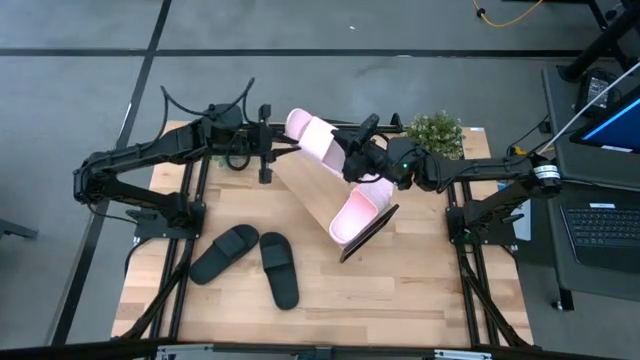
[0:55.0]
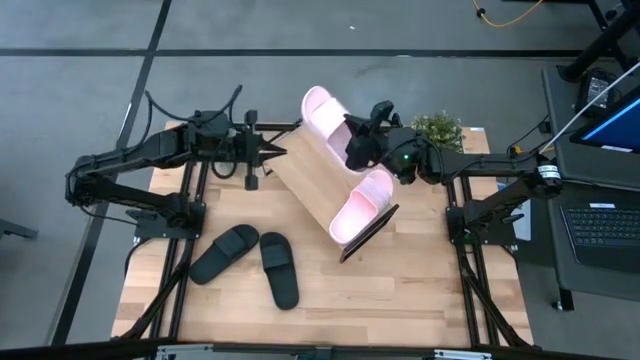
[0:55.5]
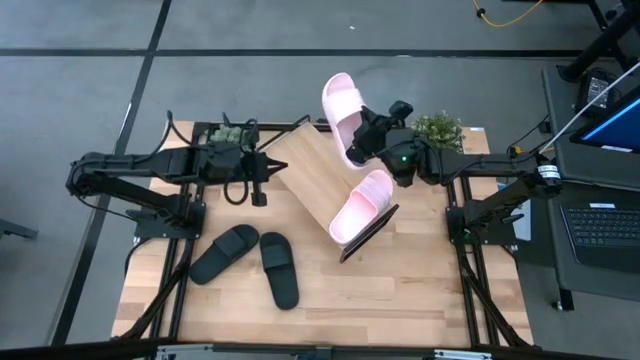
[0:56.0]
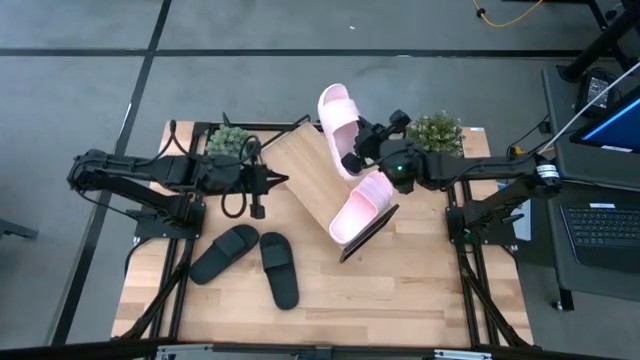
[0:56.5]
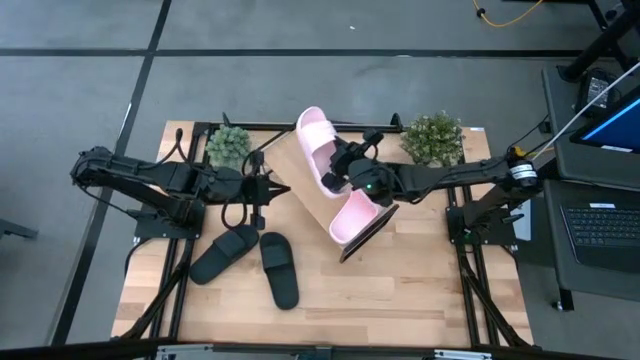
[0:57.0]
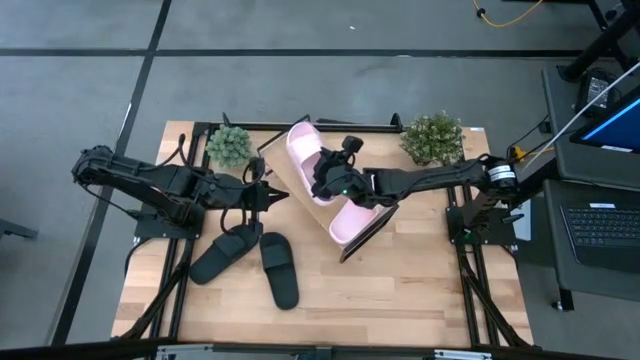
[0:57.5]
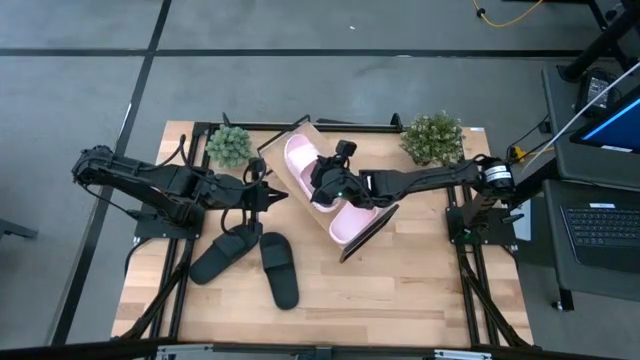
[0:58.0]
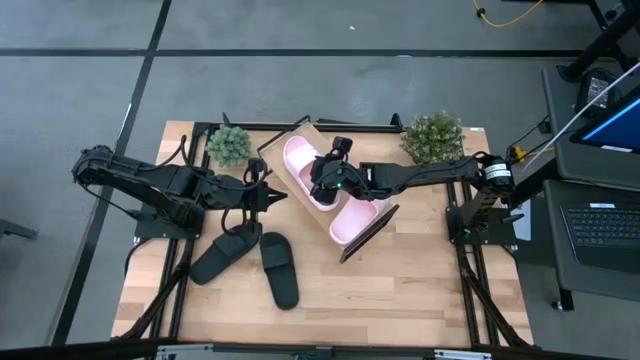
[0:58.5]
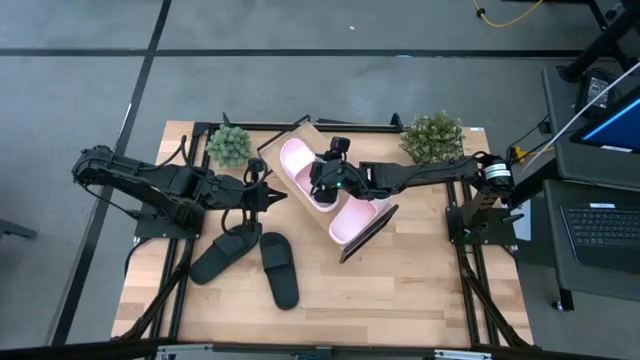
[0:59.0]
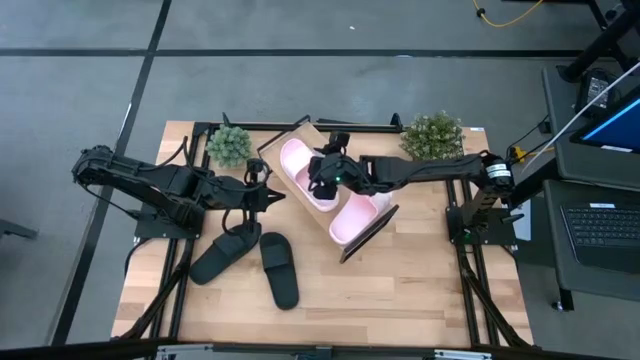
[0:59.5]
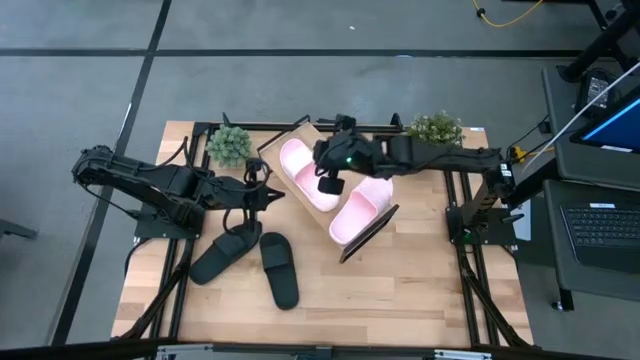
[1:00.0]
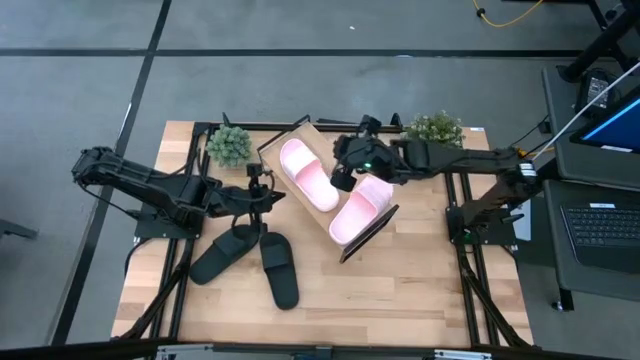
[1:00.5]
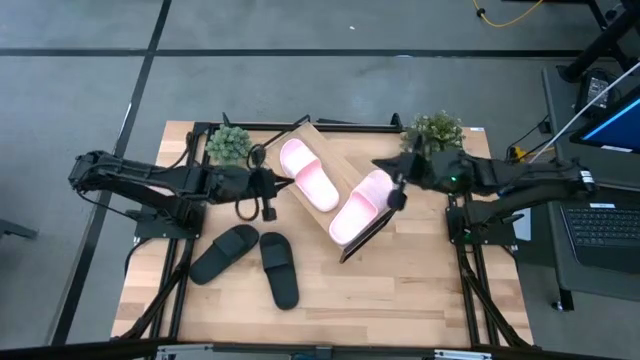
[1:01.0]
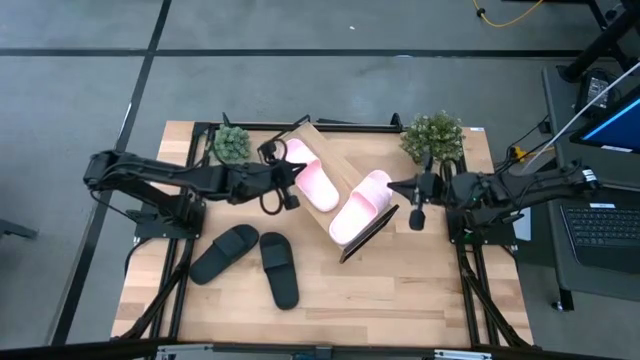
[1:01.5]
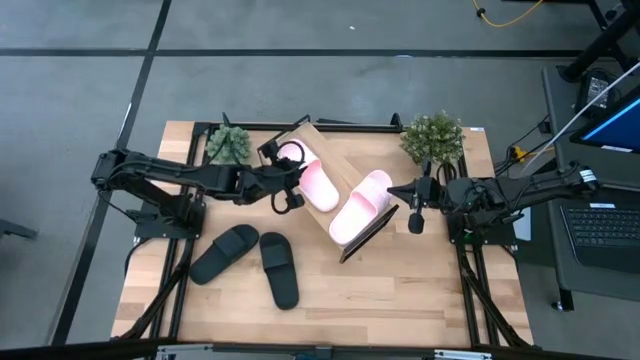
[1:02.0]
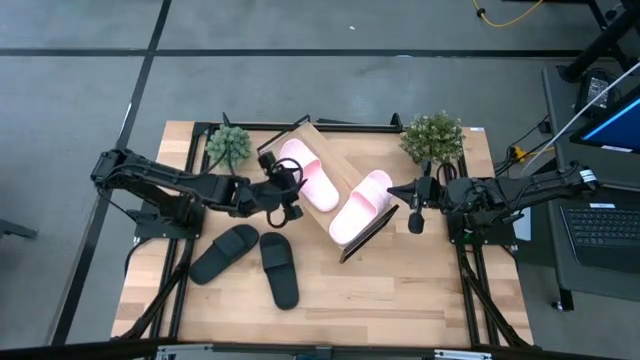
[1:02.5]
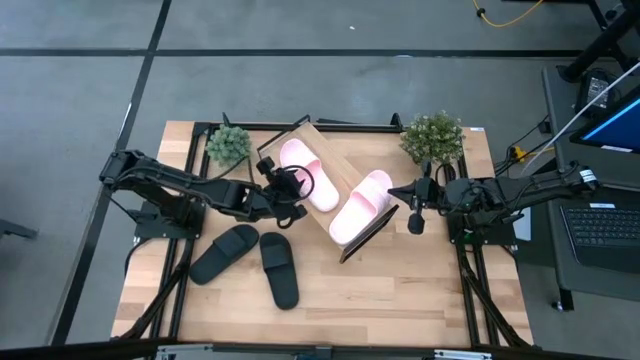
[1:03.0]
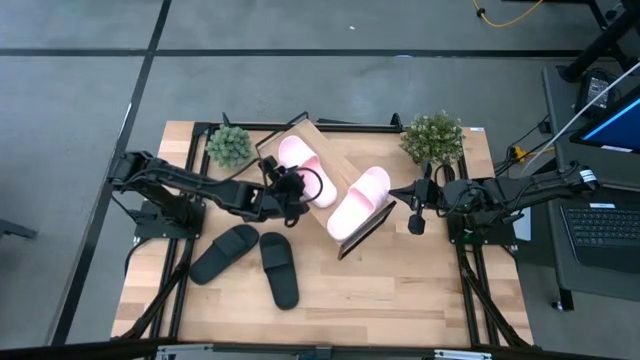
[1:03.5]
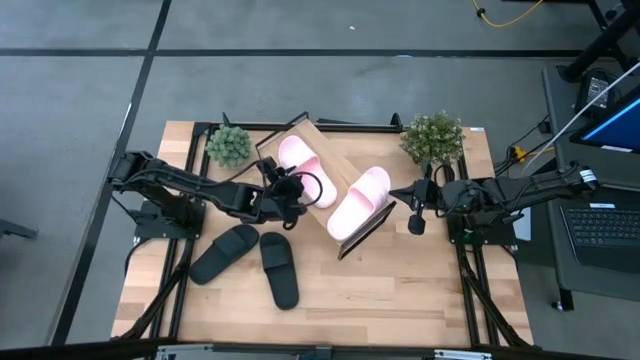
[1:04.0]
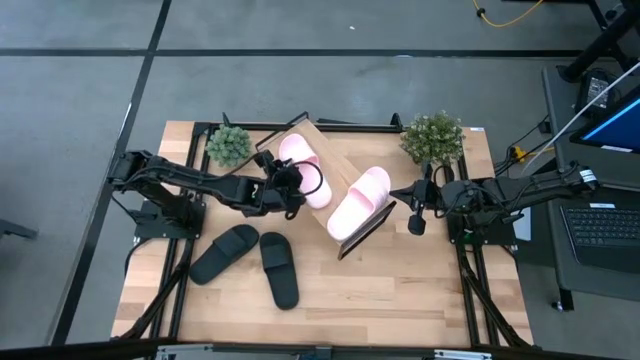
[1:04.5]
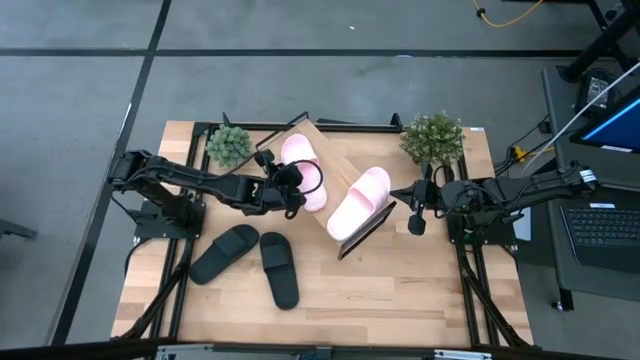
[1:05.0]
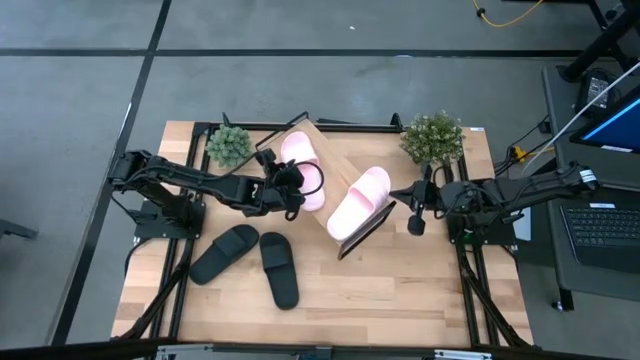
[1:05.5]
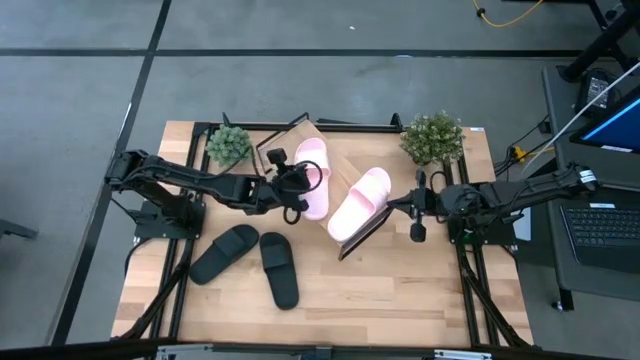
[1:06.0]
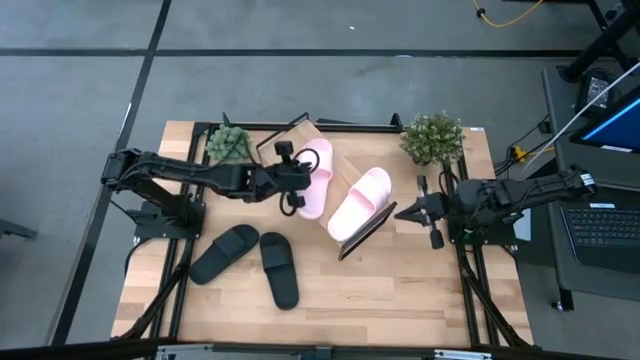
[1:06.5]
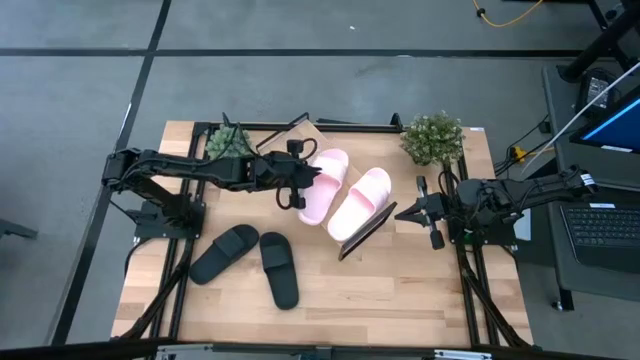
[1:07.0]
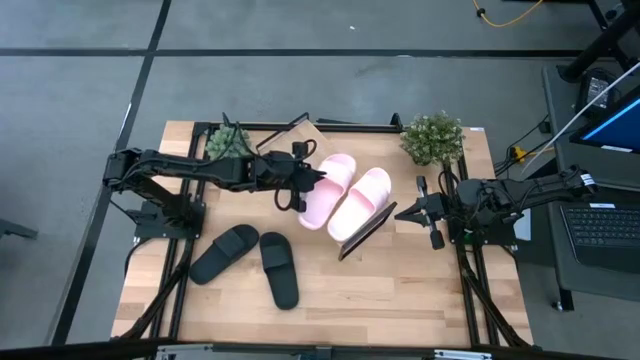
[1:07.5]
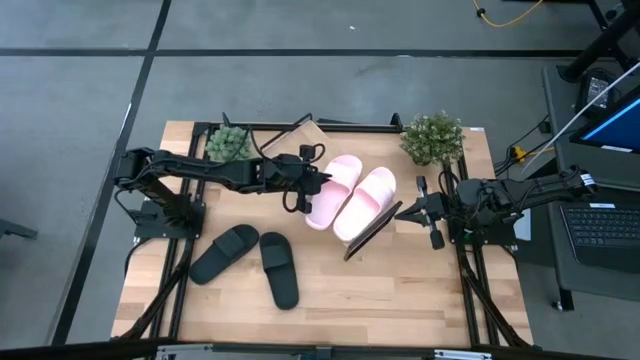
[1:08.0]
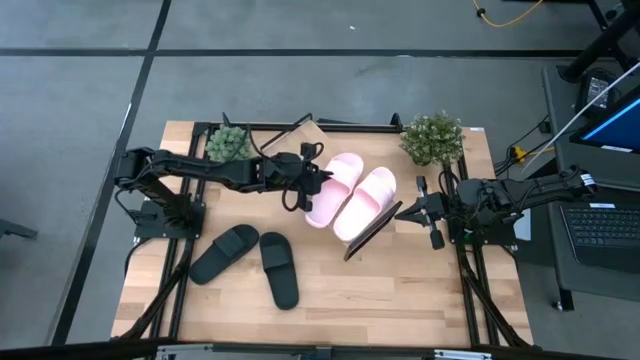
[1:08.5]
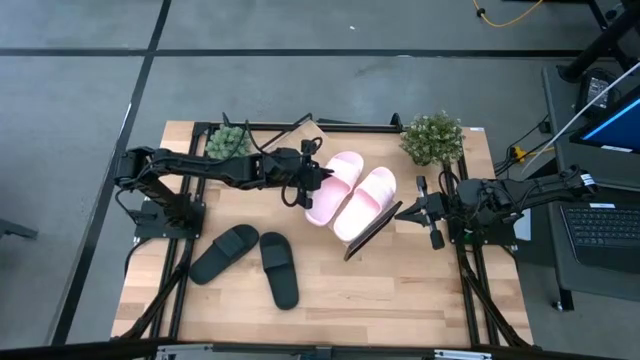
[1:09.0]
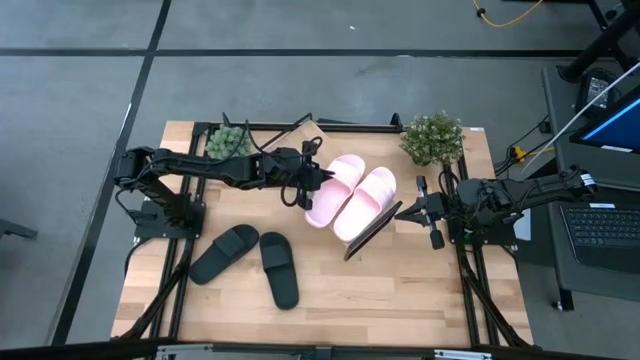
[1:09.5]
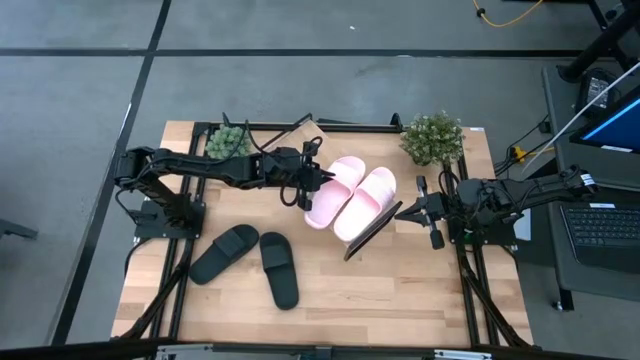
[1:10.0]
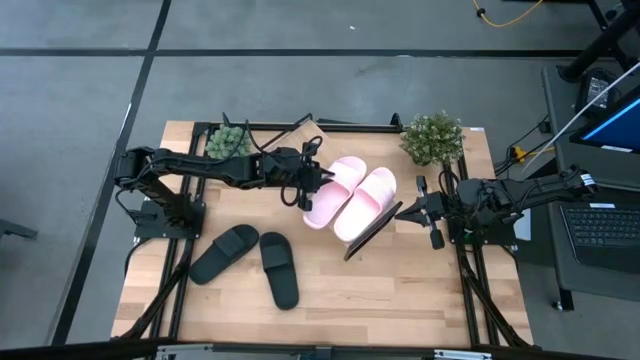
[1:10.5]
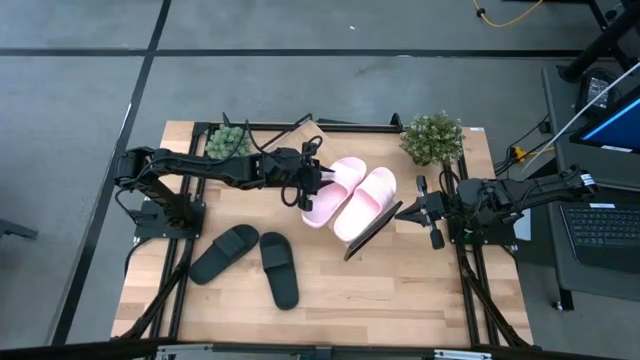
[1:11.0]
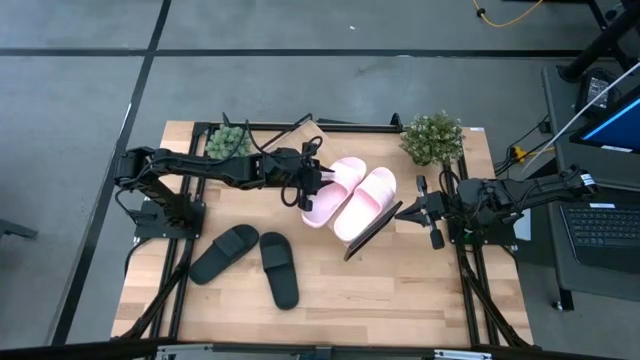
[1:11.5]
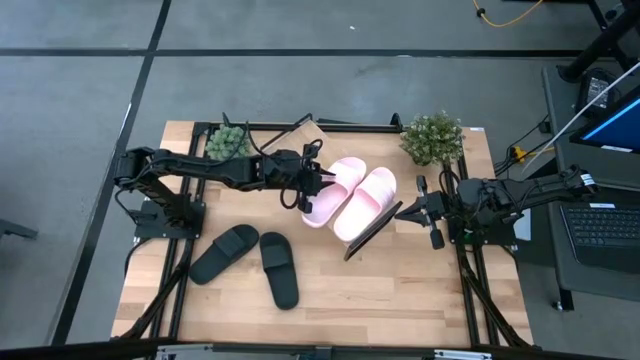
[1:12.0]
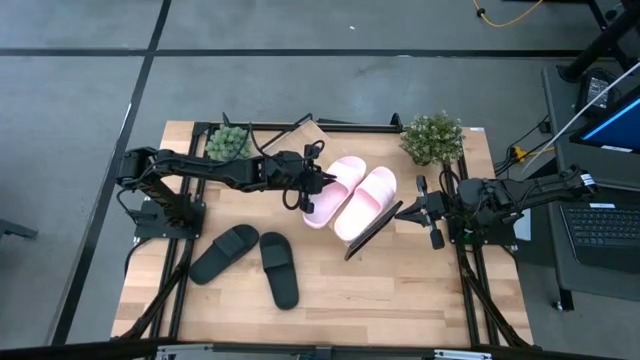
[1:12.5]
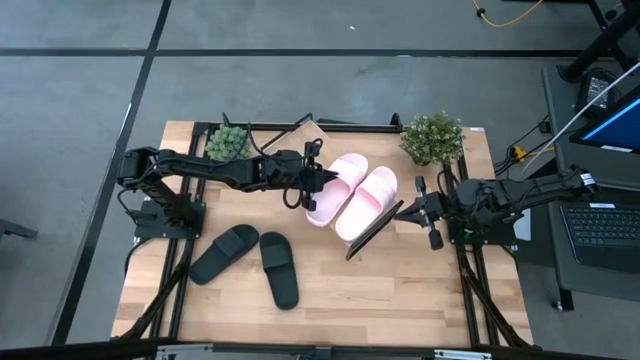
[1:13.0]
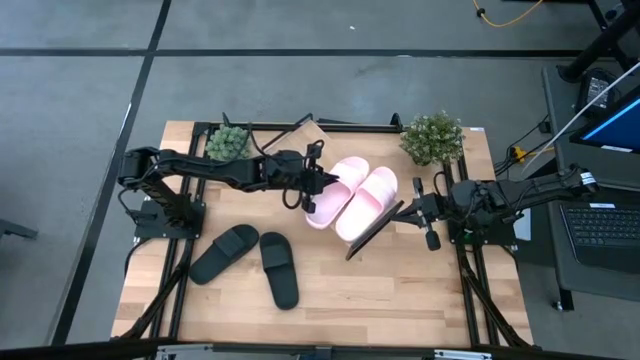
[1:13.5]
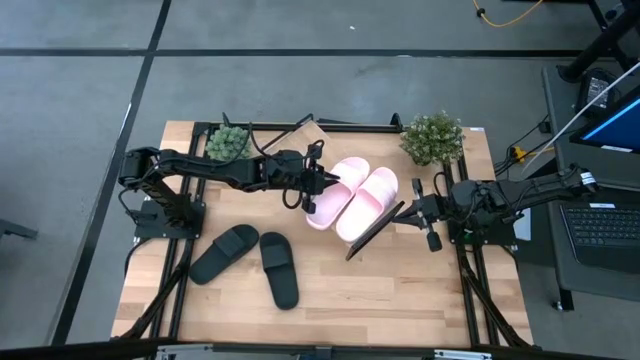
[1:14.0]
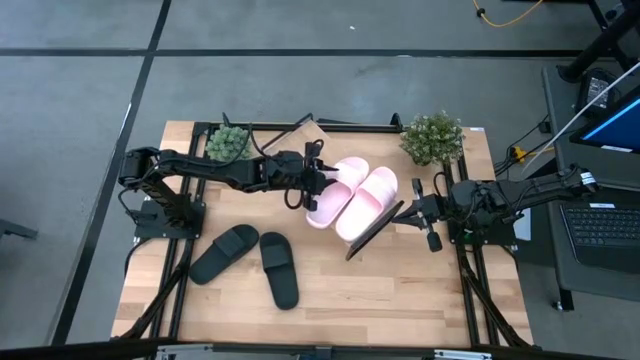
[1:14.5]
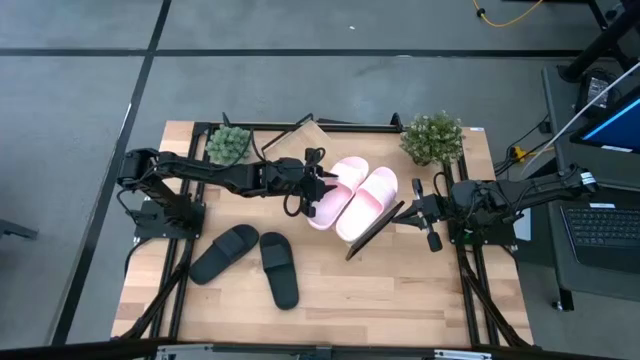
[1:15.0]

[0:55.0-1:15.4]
Task: Pick and place slides into the shelf
Put the pink slipper on the shelf
